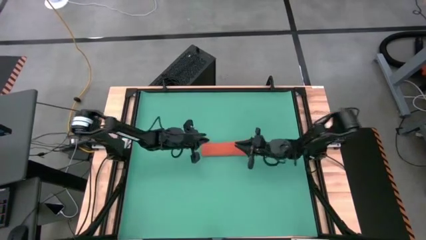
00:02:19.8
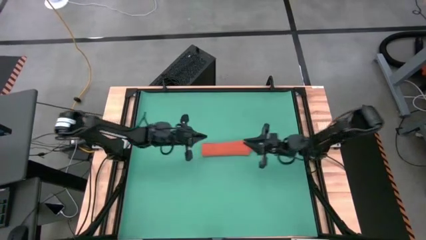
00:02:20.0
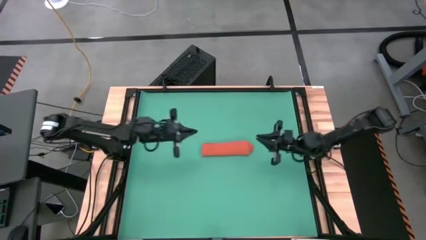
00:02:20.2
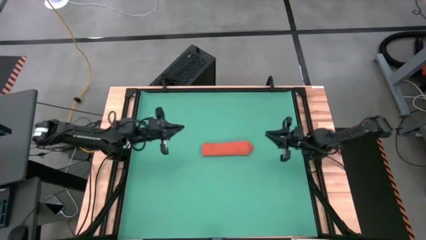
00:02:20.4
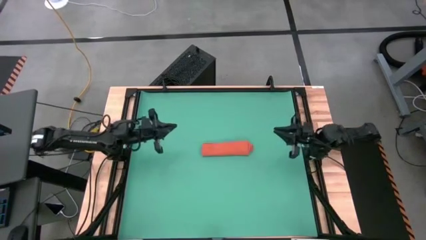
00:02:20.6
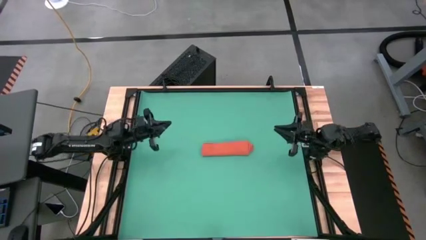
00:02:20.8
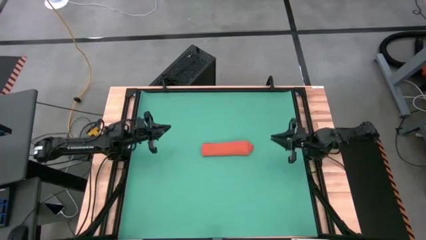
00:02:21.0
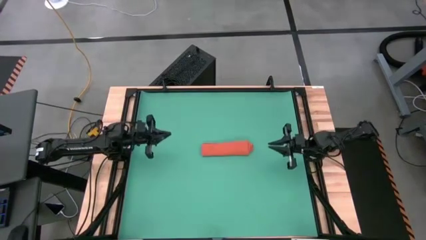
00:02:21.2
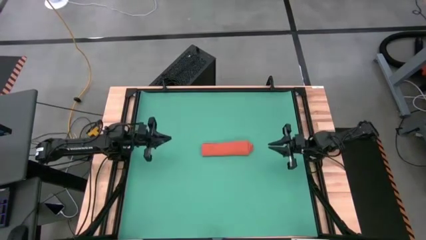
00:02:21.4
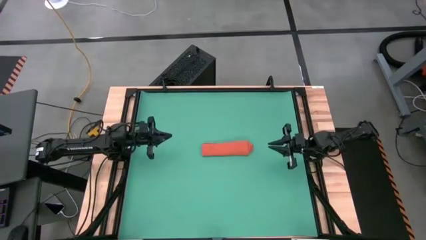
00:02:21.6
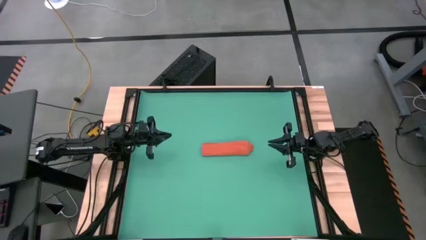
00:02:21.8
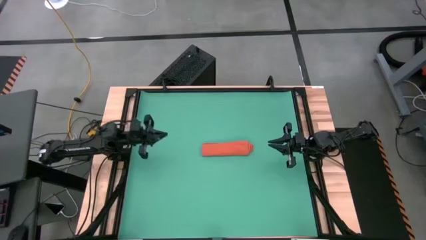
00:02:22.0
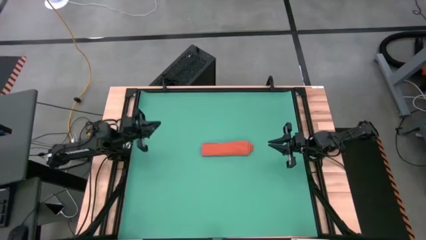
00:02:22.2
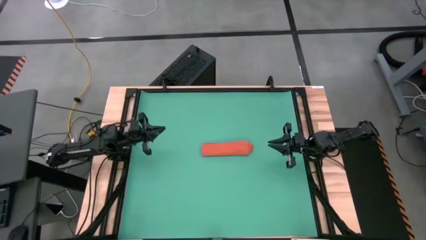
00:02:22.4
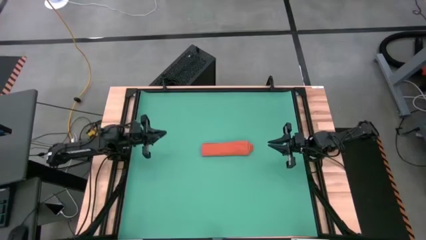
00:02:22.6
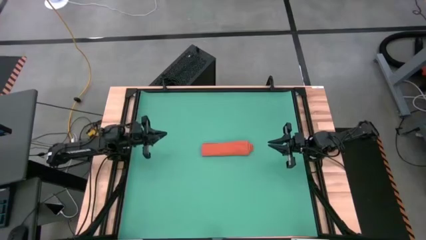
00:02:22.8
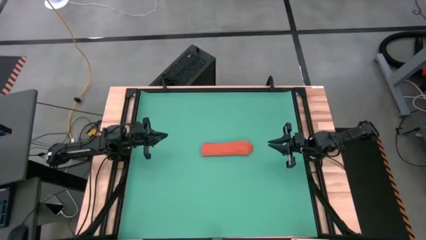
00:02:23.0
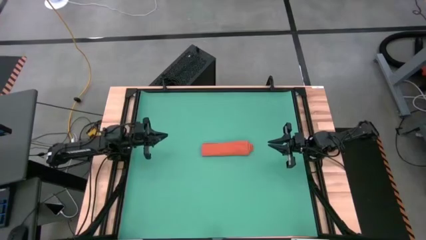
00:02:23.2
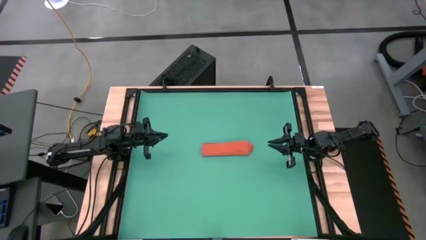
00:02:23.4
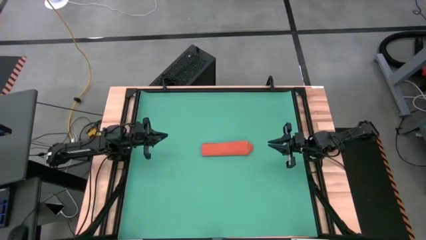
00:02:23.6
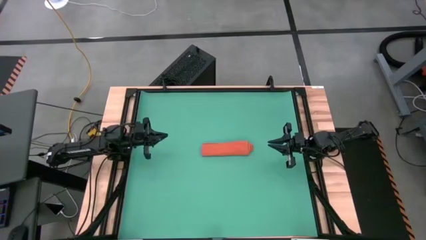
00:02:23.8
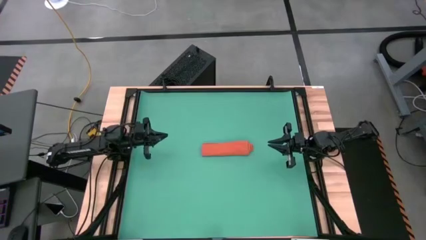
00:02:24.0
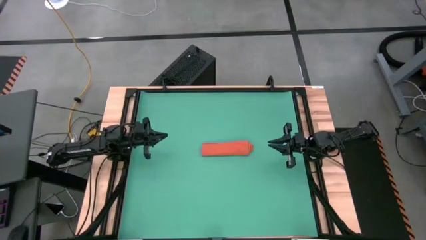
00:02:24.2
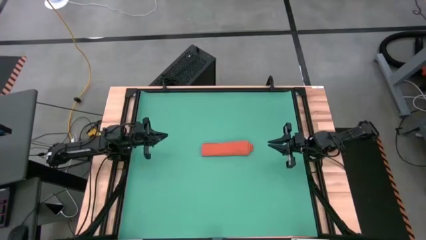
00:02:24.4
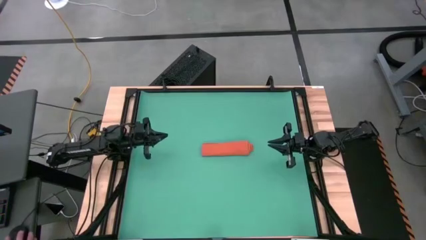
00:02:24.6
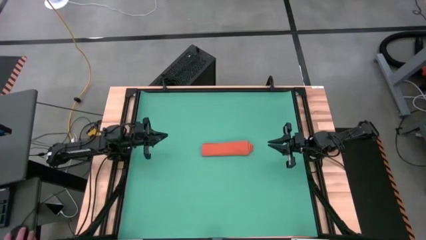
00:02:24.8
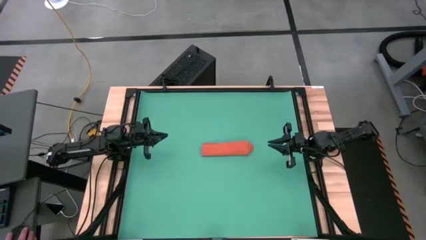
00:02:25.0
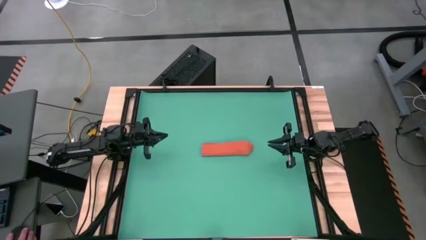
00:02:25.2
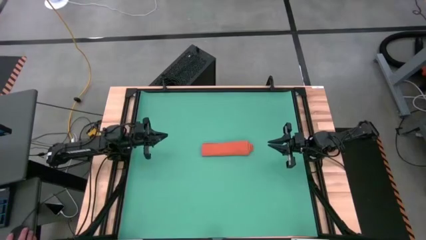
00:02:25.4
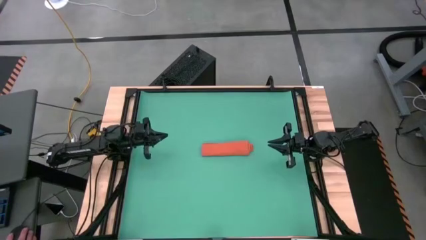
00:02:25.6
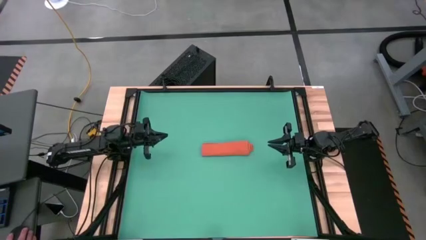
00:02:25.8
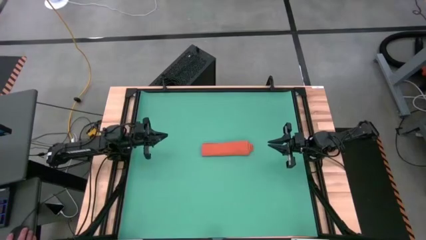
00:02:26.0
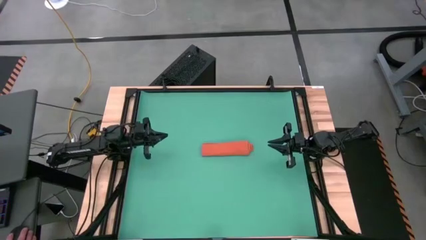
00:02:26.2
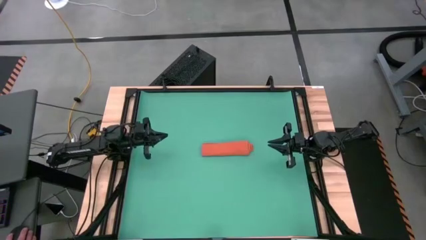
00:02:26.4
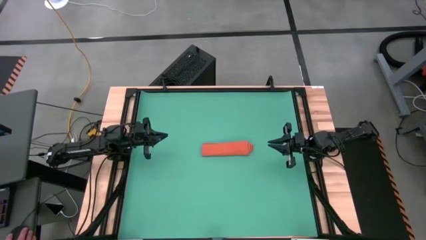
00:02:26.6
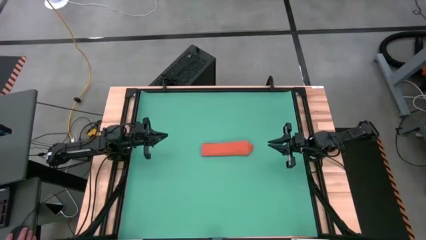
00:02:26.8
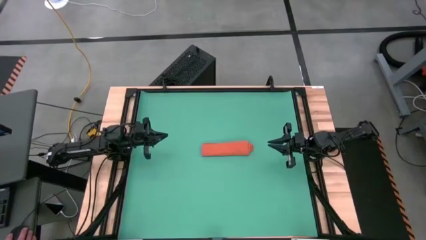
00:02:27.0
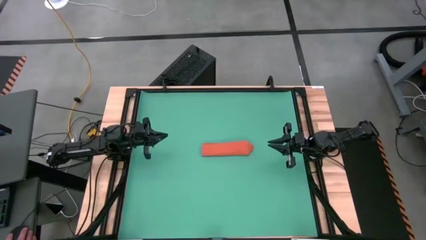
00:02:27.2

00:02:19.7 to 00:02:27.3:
Task: Roll towel
Return to Home Position

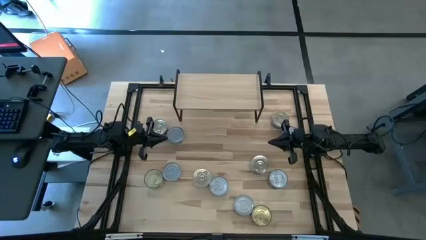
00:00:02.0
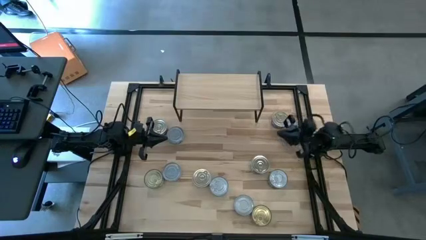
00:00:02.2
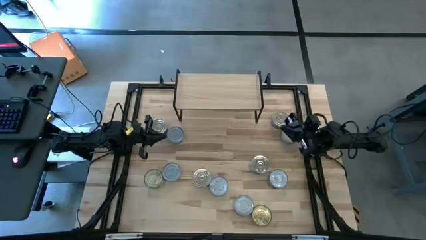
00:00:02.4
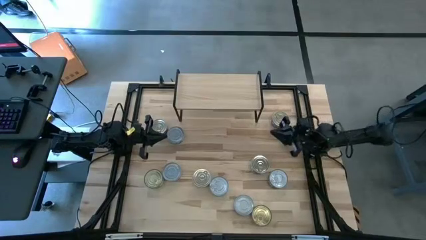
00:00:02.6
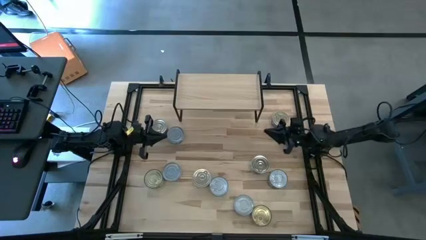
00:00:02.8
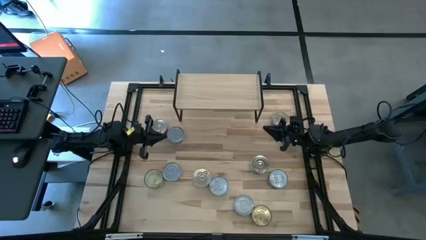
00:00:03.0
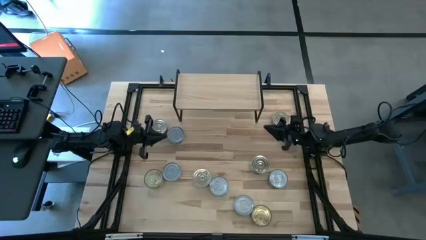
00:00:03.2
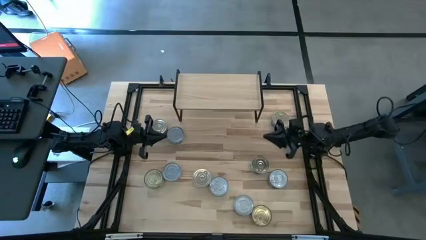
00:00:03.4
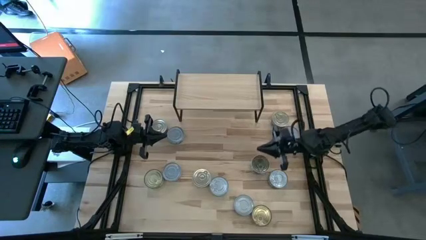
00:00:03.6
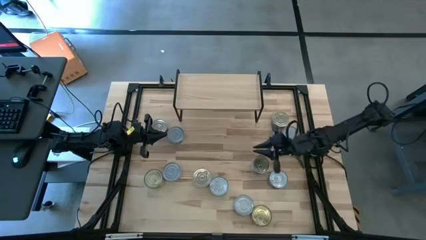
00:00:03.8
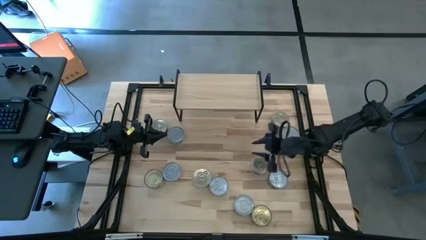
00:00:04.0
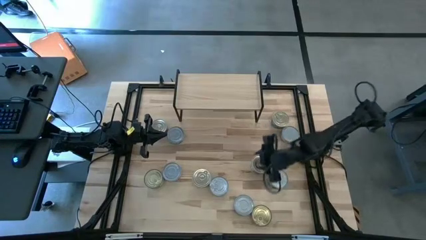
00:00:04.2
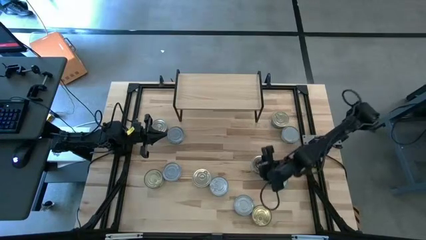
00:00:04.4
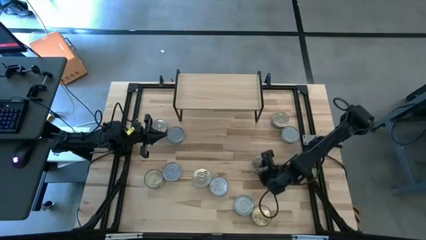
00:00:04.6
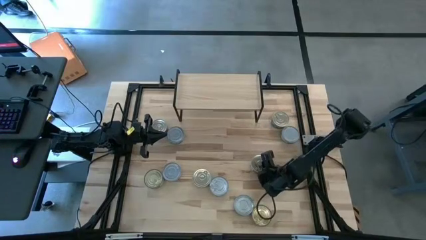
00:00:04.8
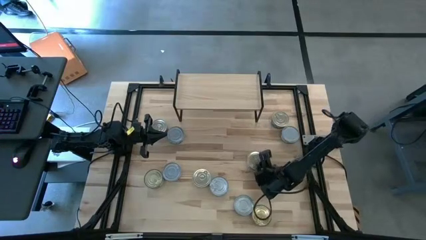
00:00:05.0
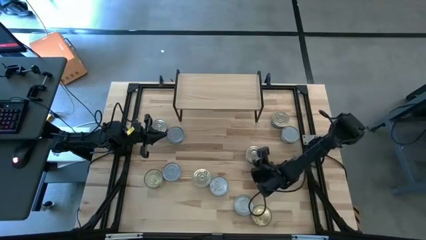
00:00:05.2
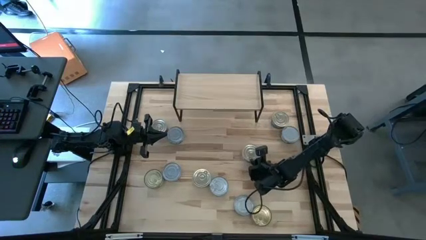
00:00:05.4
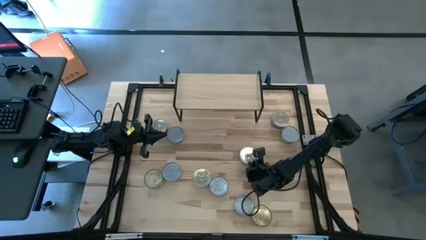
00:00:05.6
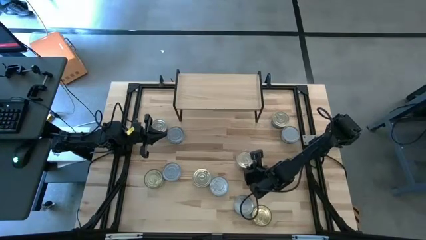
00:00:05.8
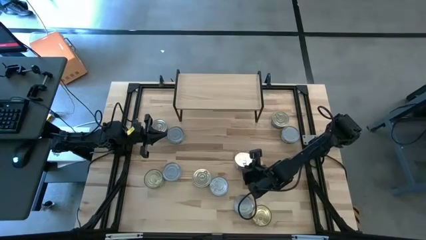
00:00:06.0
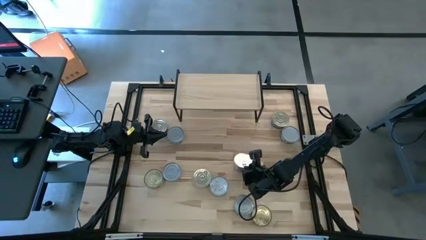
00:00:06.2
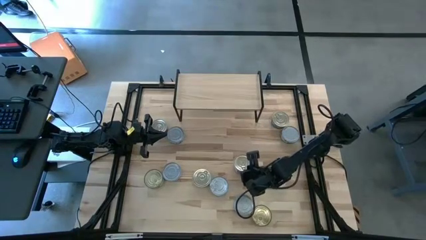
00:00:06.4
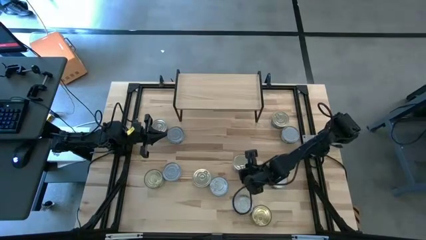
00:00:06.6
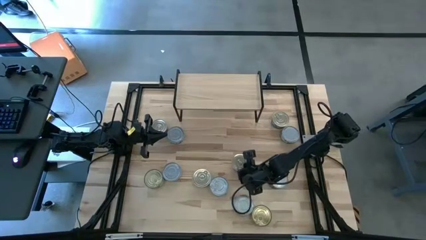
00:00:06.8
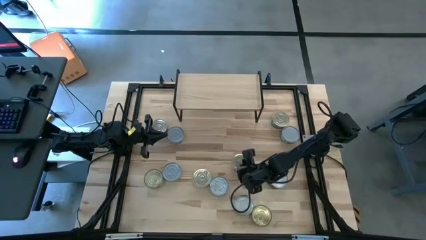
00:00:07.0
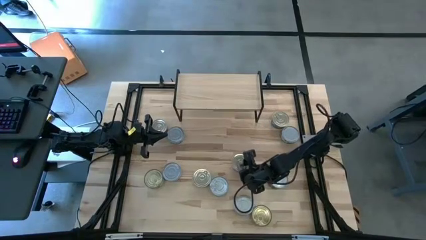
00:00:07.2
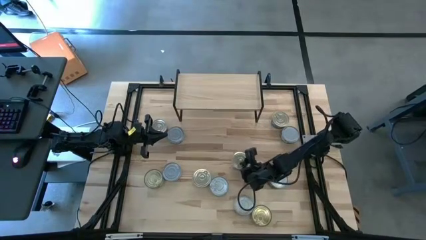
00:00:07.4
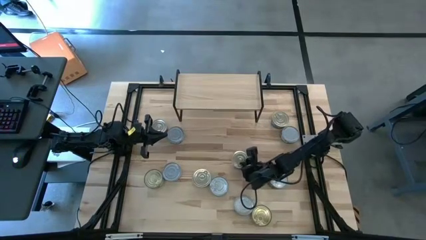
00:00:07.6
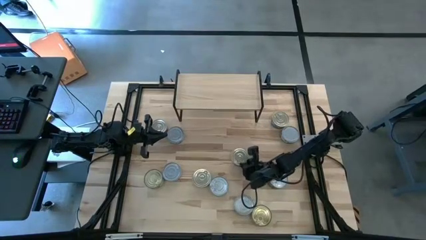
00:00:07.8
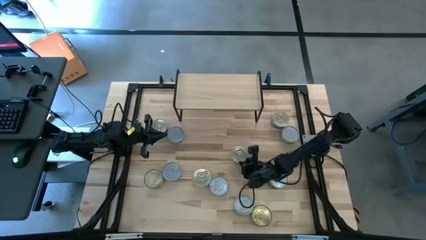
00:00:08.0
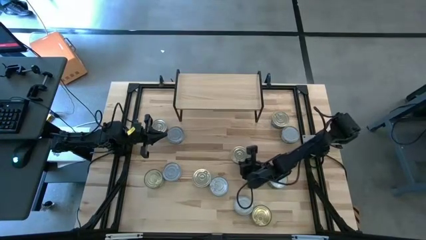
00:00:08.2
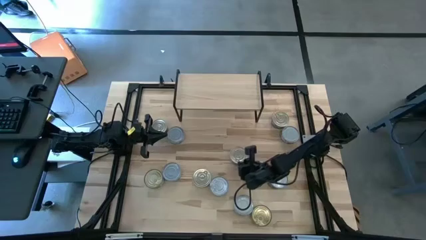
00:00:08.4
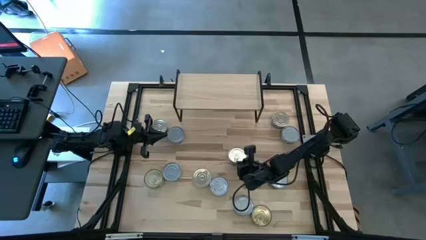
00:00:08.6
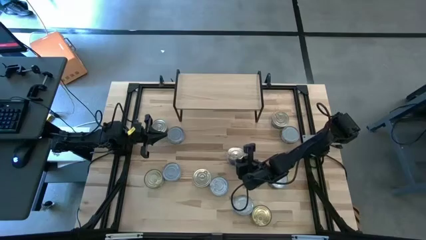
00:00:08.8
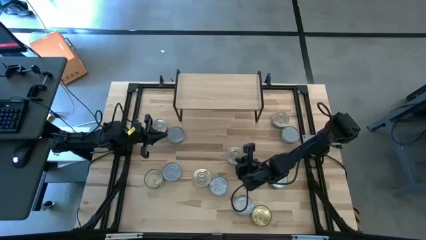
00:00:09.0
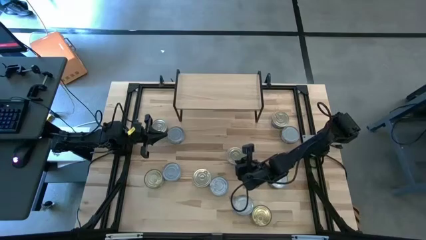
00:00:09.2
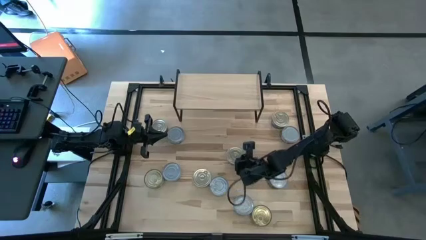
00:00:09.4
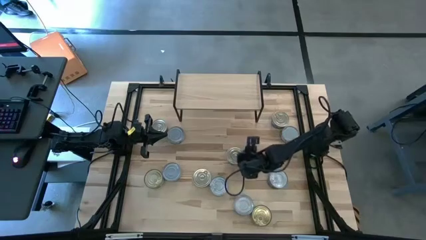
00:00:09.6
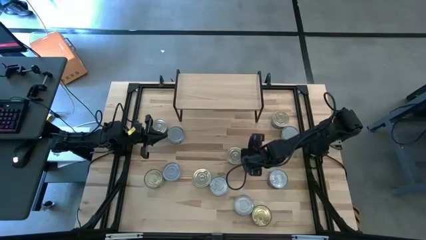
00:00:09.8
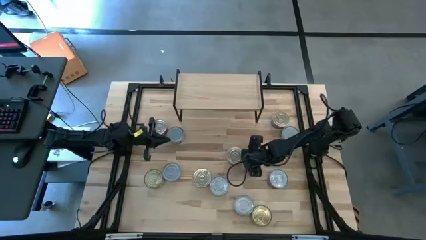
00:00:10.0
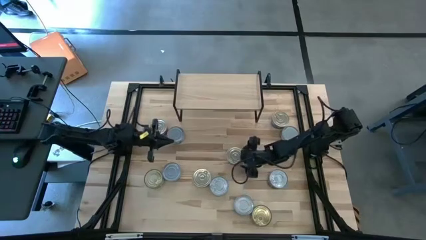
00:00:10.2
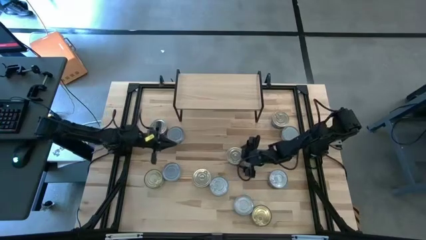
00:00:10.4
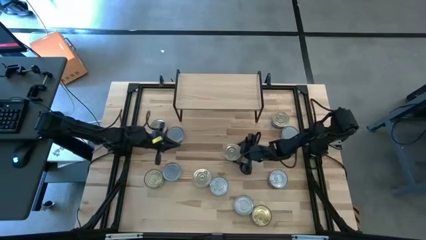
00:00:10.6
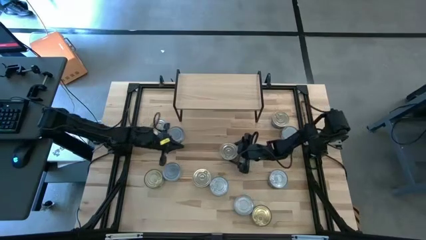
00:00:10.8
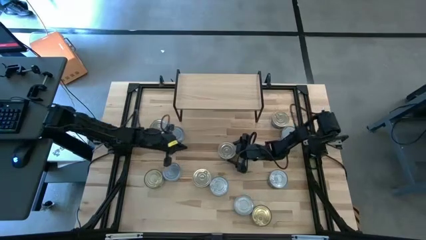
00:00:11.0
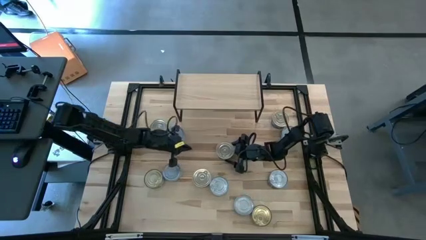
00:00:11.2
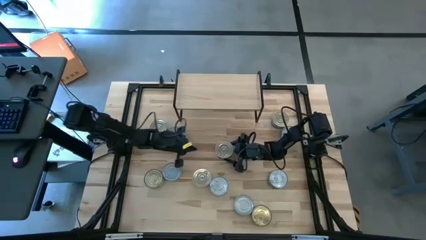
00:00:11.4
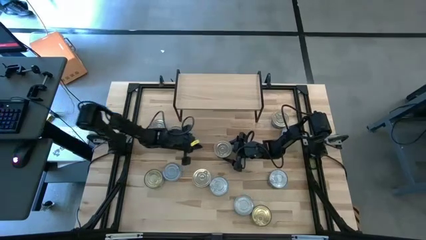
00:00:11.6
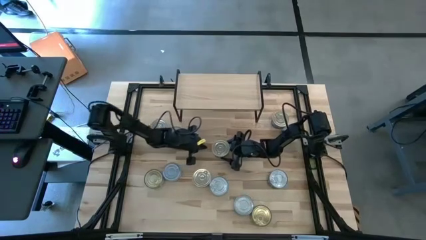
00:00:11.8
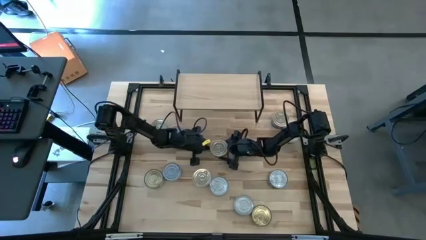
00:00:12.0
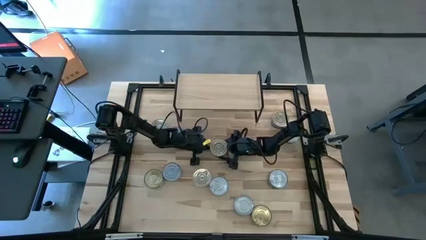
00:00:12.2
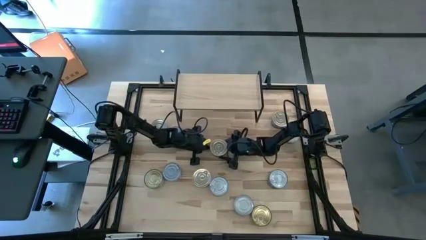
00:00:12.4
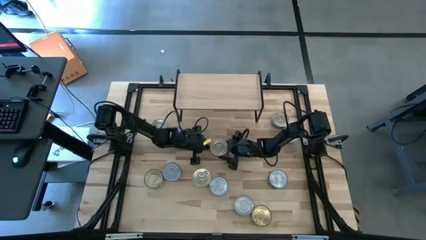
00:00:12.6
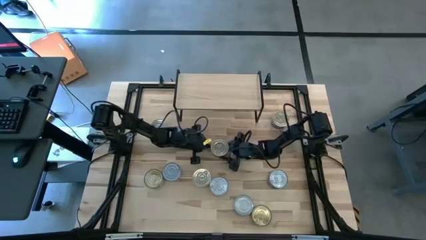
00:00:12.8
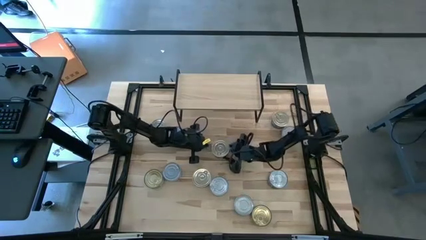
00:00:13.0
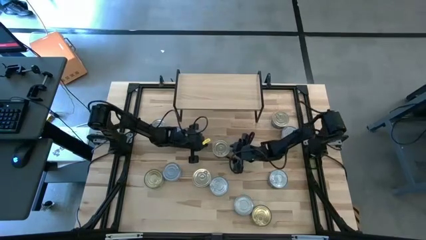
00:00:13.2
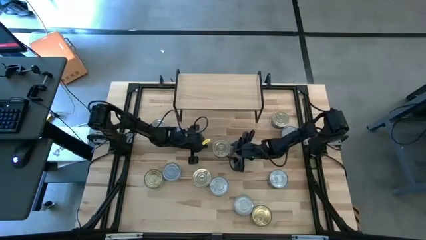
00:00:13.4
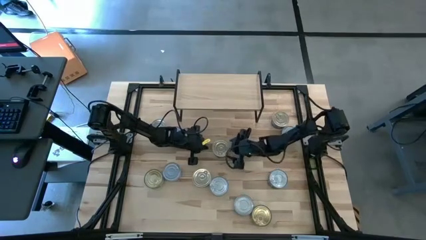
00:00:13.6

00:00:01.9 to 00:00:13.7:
Task: Stack canned seafood by type on shelf
Put the bottom right blue tuna can on the shelf
